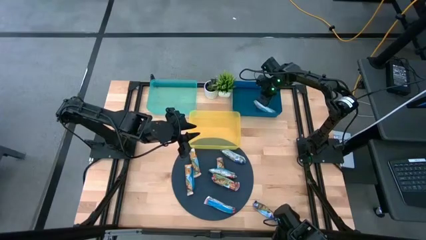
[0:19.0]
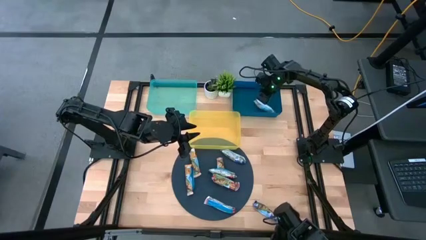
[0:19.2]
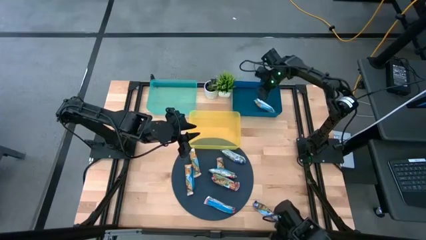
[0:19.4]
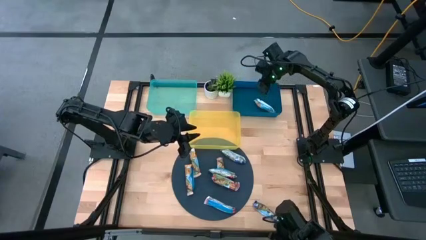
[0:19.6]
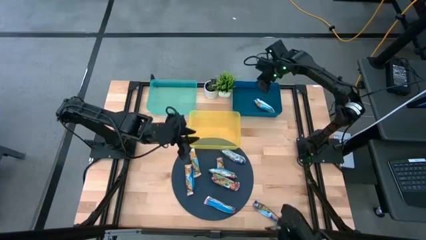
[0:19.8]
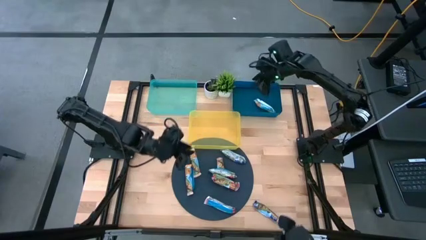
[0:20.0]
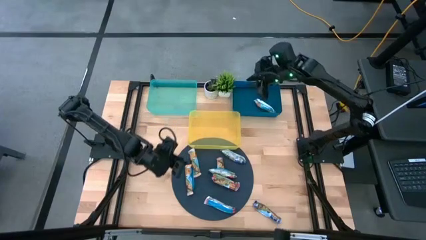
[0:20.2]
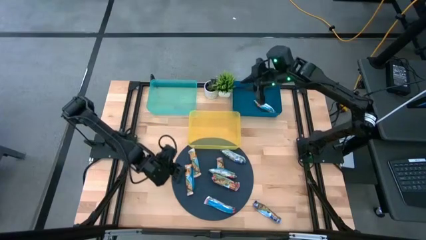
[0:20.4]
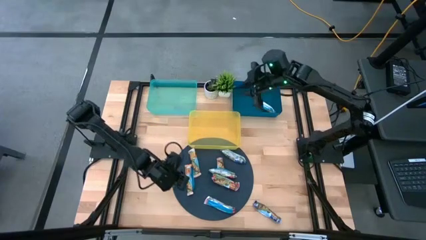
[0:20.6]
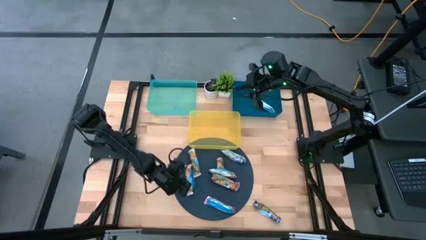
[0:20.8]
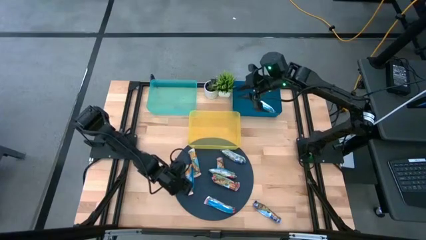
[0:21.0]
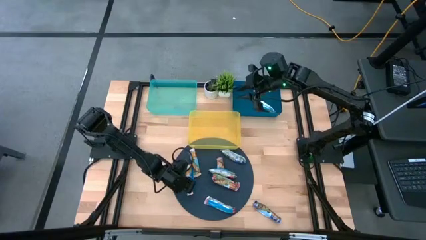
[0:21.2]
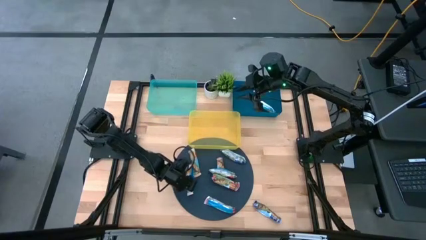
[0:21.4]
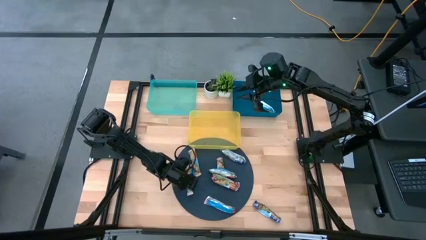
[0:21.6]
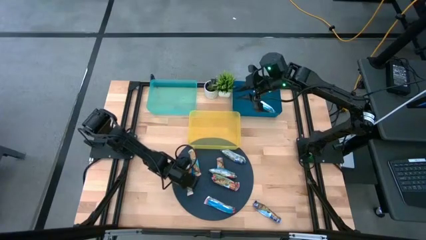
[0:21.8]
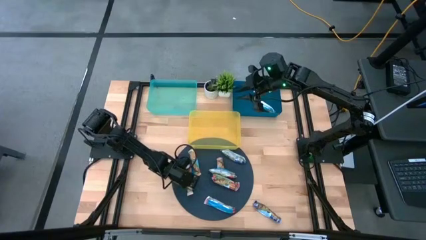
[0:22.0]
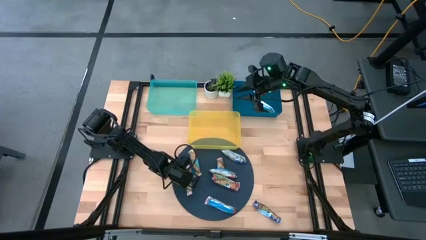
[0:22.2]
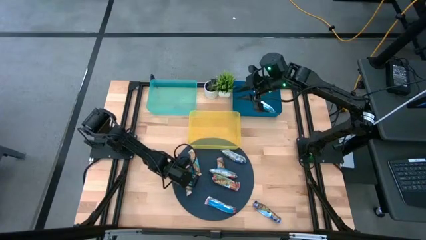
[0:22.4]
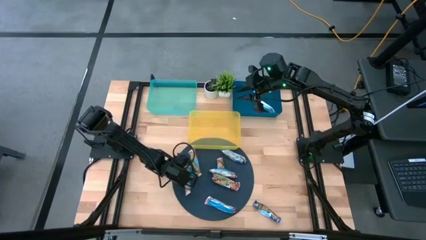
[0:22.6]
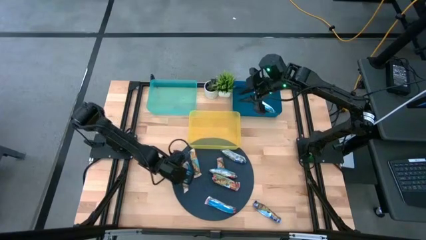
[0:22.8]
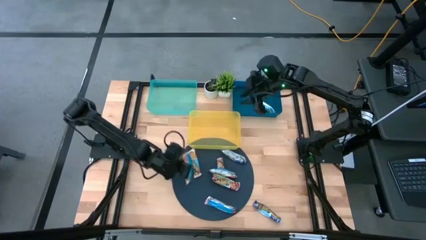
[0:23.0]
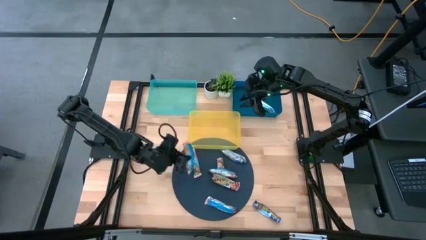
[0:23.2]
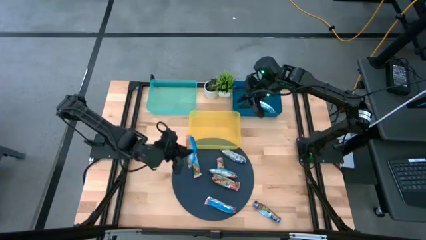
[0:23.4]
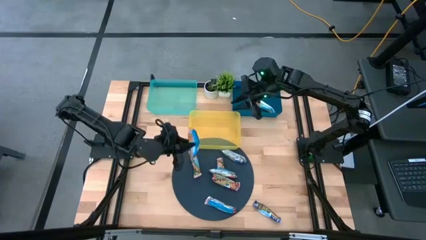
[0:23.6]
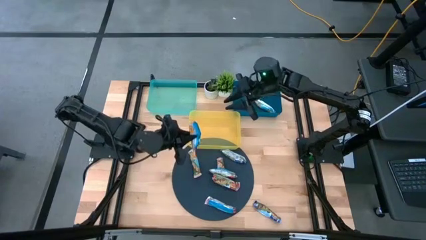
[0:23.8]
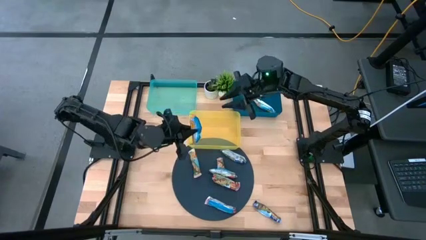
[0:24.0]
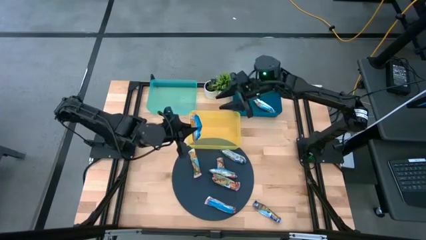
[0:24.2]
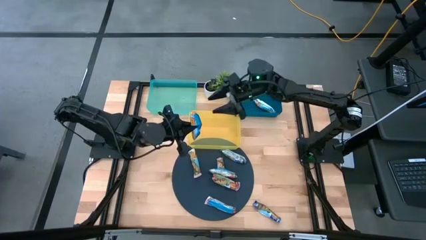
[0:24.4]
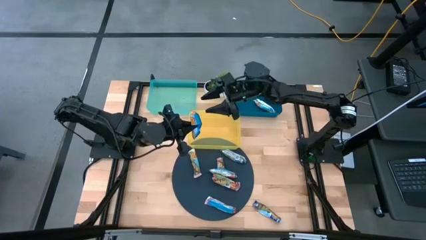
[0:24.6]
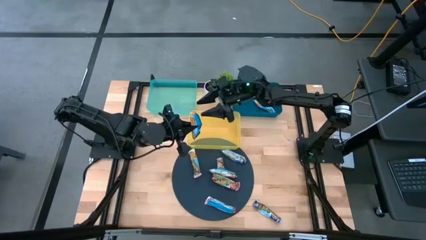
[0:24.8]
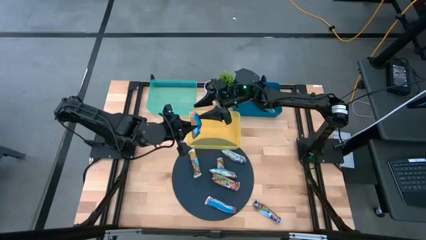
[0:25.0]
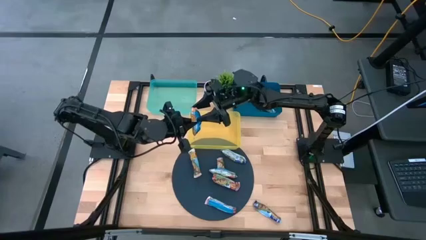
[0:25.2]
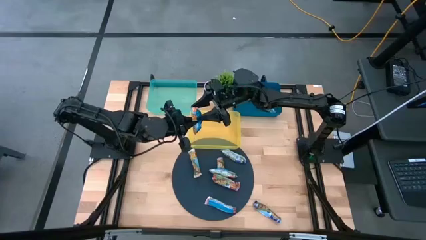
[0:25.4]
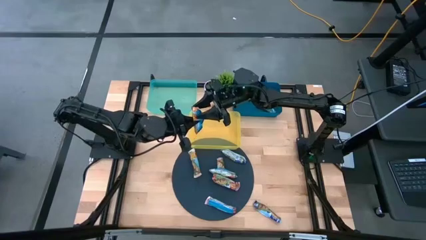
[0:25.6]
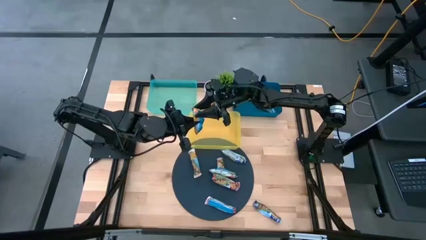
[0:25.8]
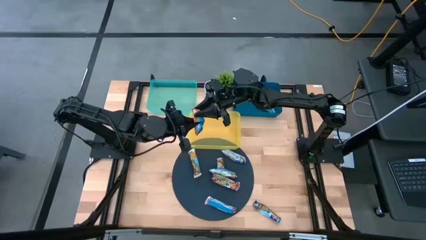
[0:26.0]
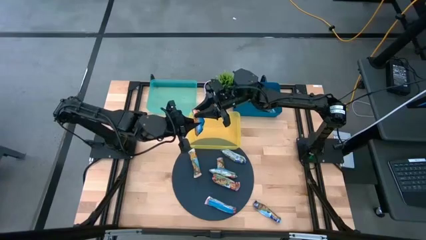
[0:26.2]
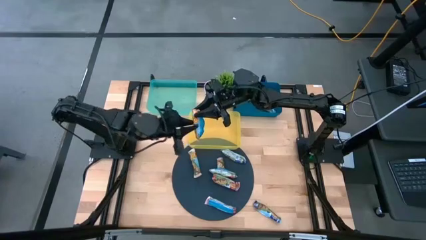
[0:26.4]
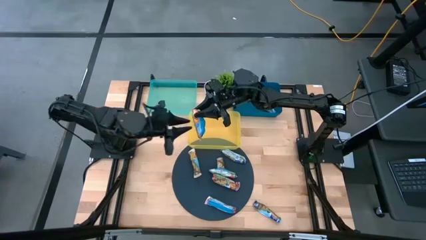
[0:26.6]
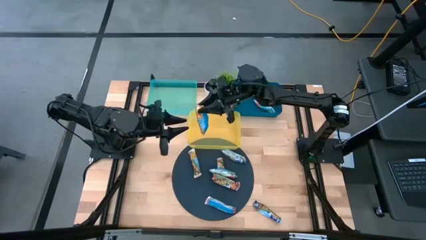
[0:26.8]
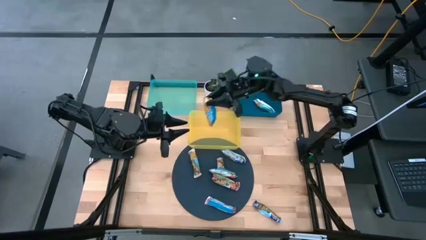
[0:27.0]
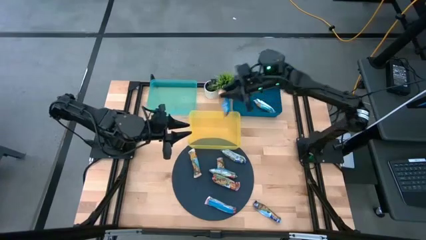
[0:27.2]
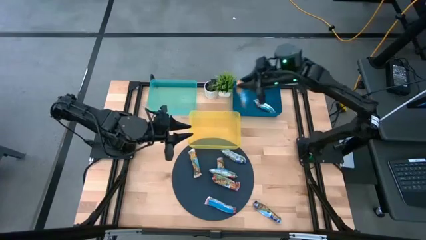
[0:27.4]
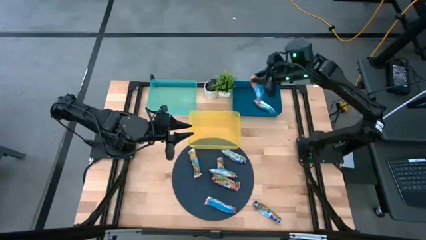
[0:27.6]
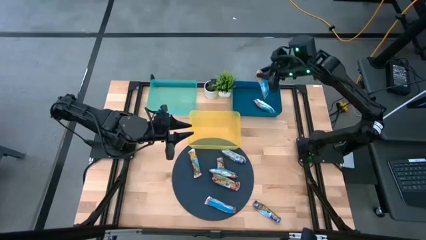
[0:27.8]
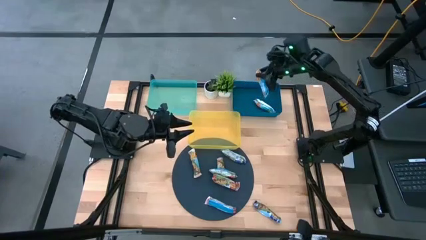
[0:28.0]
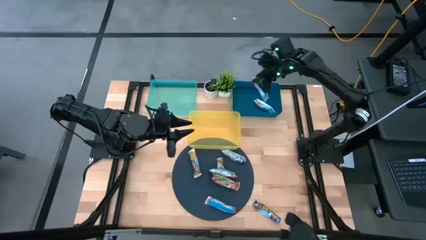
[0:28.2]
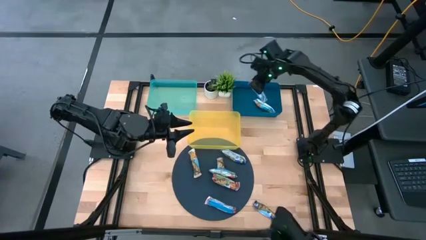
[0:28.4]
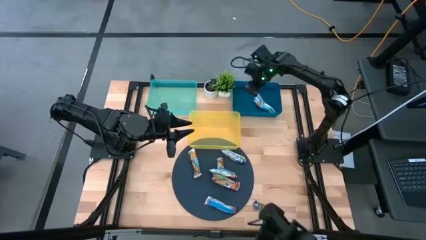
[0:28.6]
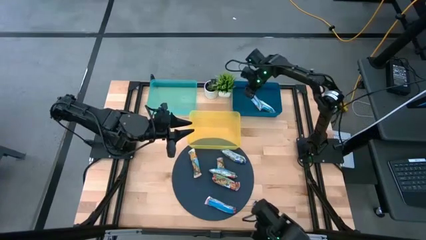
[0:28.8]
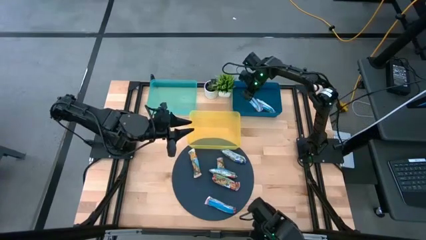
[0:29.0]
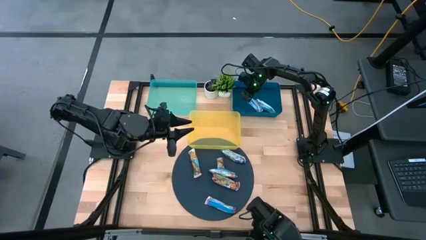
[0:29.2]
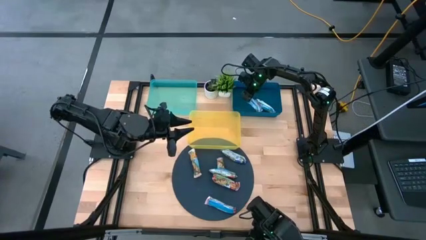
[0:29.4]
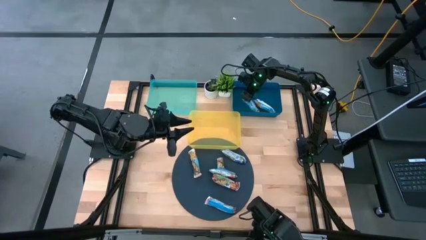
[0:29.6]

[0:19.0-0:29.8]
Task: Pick and place Granola Bars by type
Put the yellow granola bar into the blue bin
